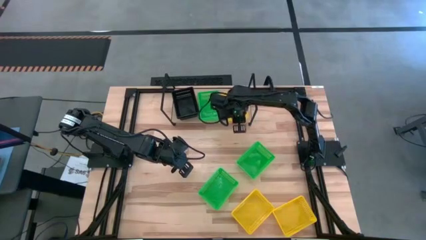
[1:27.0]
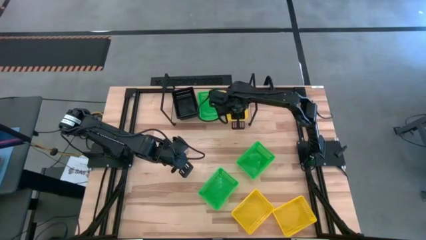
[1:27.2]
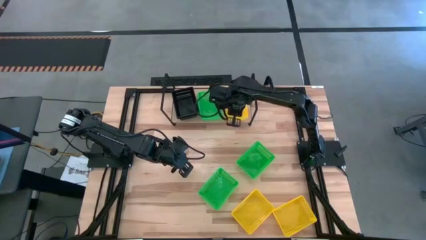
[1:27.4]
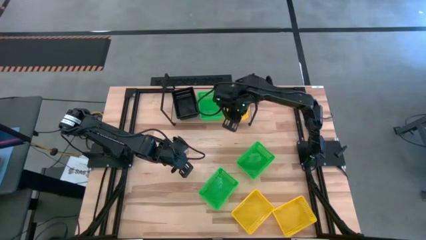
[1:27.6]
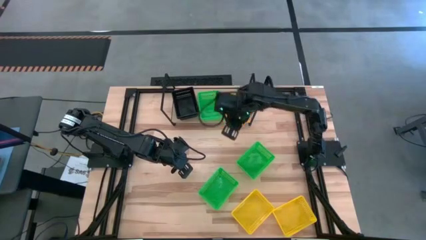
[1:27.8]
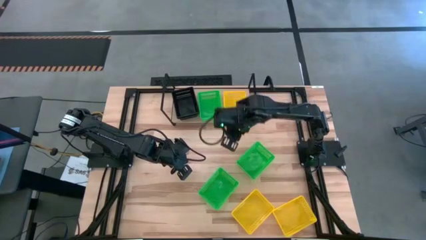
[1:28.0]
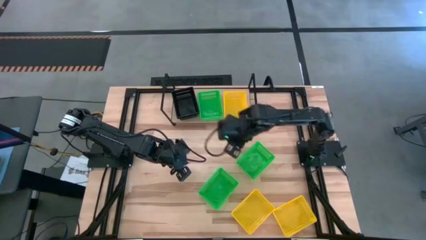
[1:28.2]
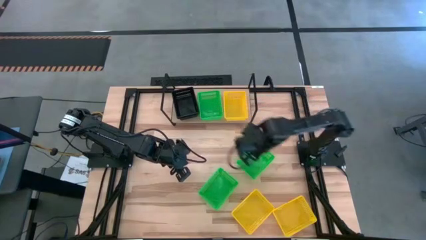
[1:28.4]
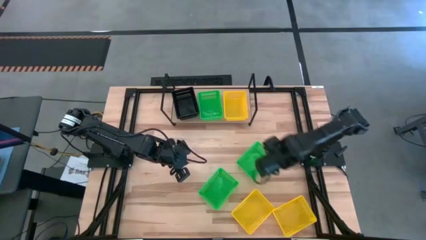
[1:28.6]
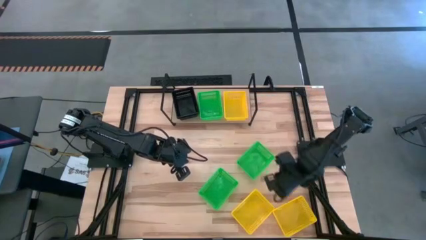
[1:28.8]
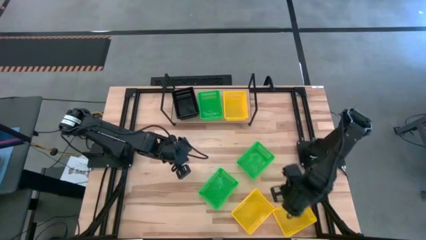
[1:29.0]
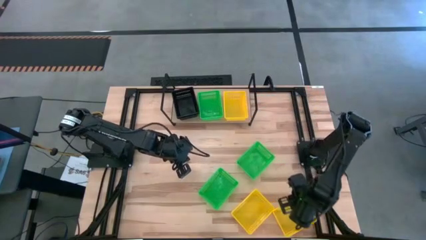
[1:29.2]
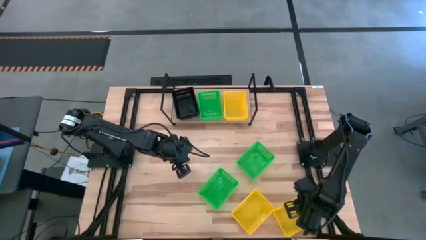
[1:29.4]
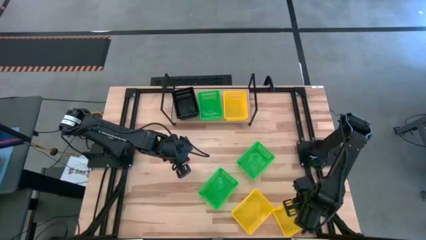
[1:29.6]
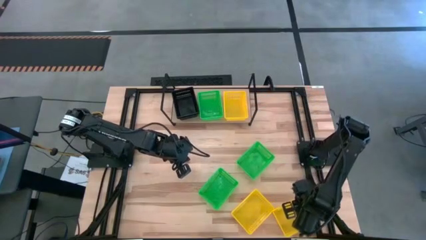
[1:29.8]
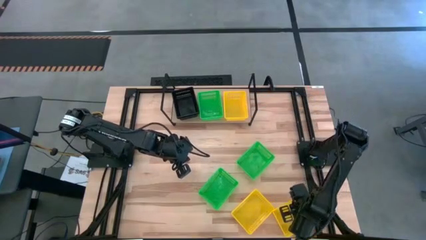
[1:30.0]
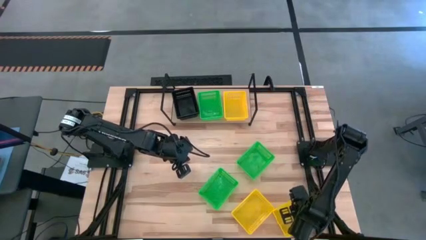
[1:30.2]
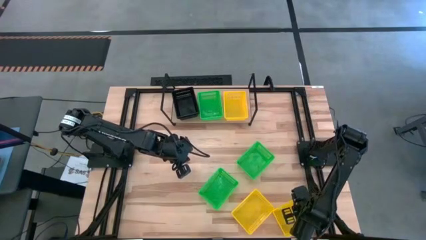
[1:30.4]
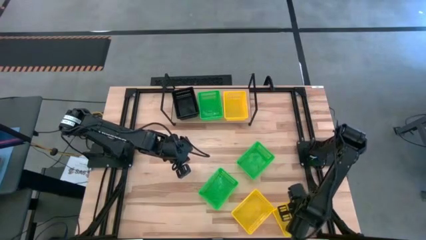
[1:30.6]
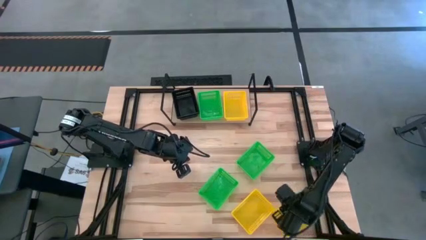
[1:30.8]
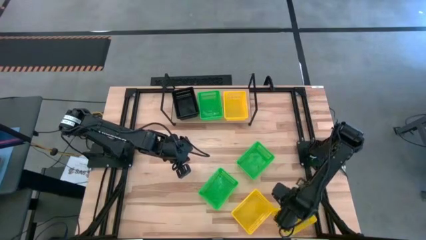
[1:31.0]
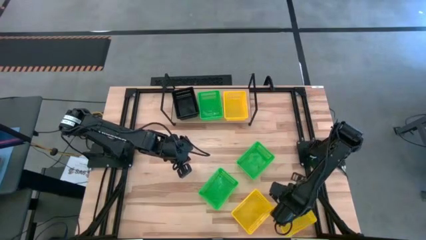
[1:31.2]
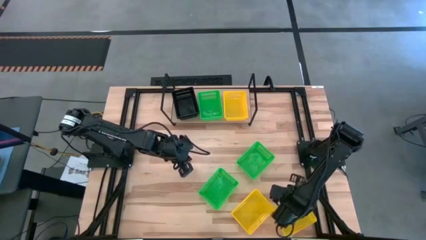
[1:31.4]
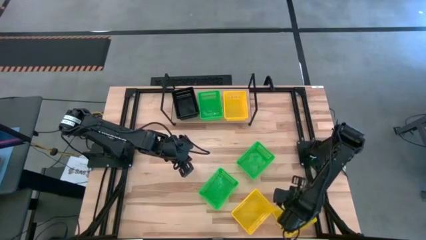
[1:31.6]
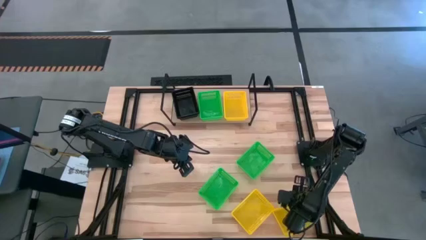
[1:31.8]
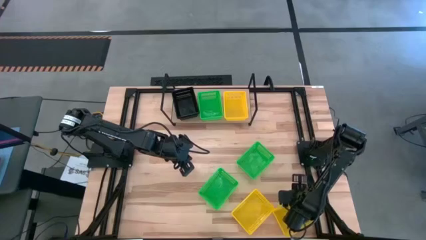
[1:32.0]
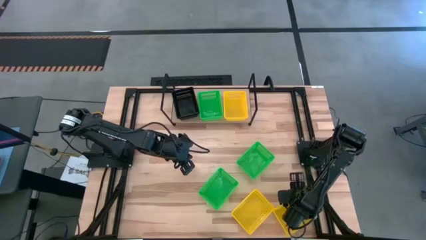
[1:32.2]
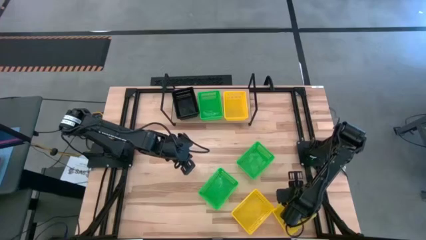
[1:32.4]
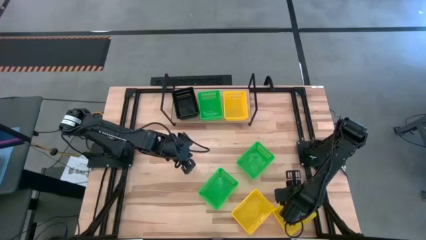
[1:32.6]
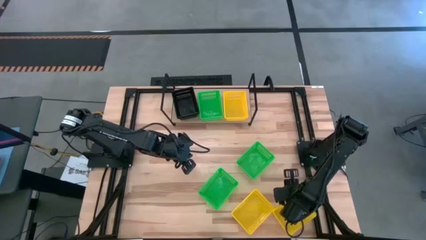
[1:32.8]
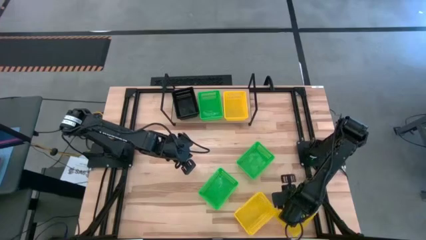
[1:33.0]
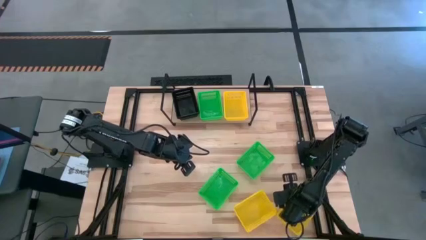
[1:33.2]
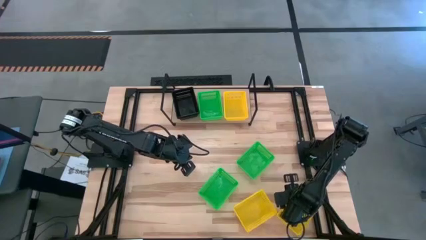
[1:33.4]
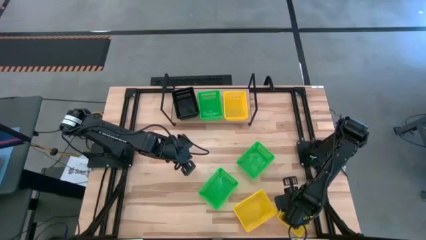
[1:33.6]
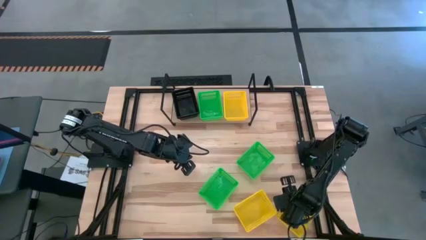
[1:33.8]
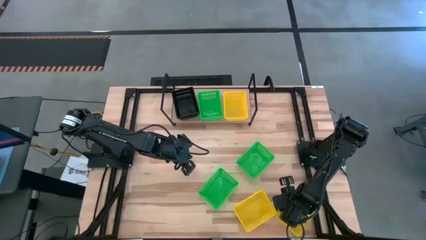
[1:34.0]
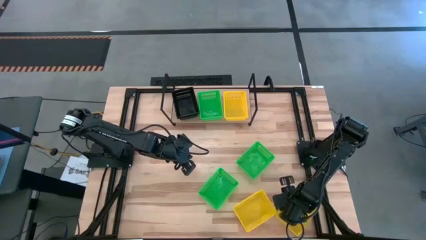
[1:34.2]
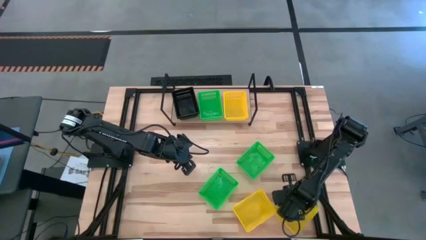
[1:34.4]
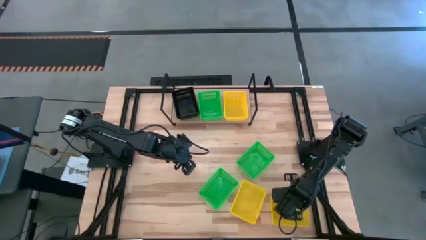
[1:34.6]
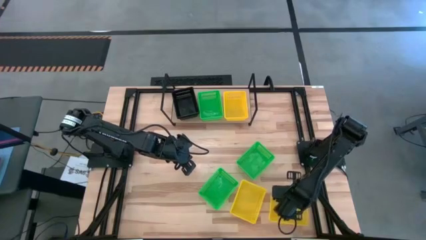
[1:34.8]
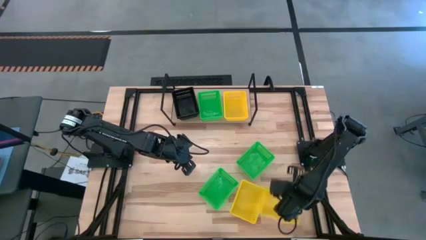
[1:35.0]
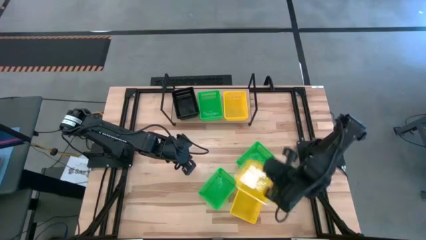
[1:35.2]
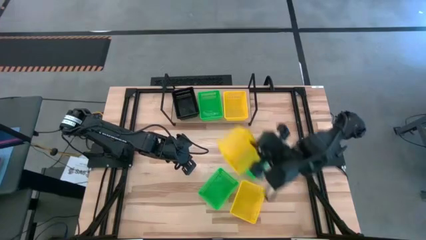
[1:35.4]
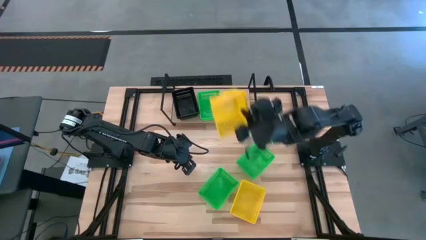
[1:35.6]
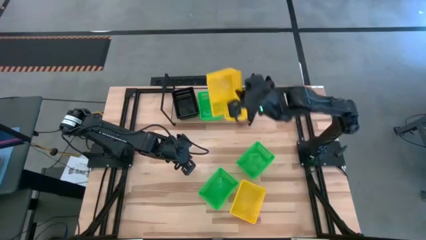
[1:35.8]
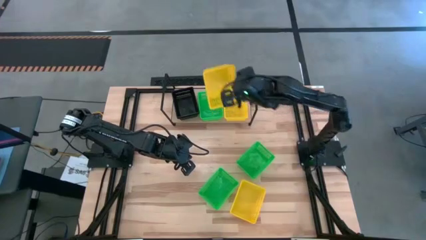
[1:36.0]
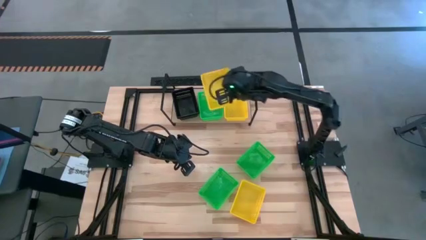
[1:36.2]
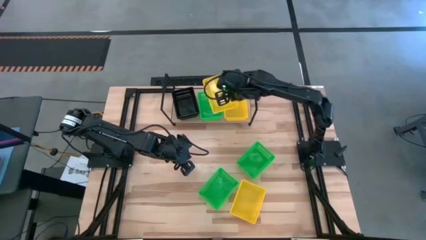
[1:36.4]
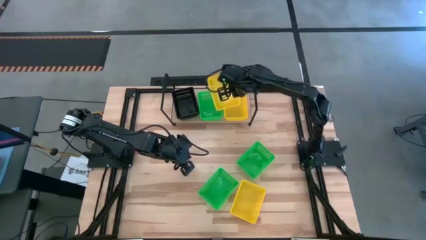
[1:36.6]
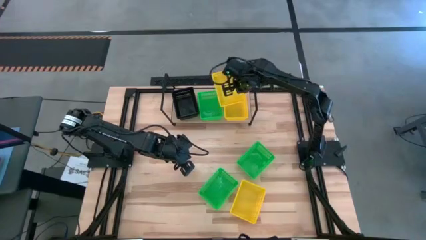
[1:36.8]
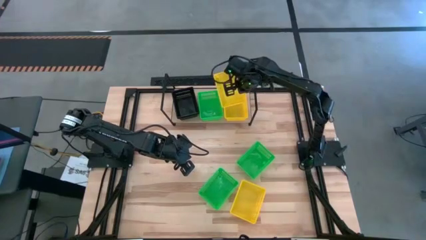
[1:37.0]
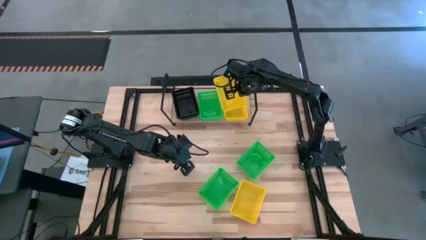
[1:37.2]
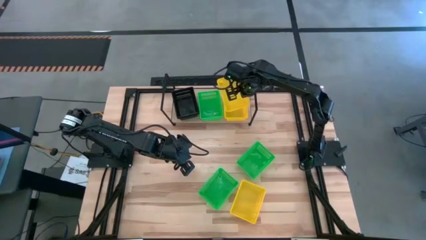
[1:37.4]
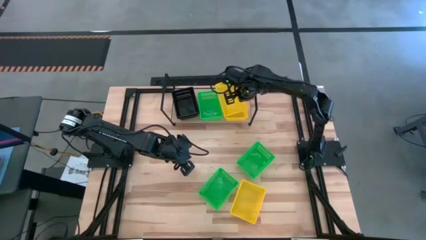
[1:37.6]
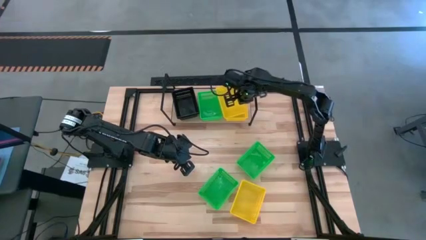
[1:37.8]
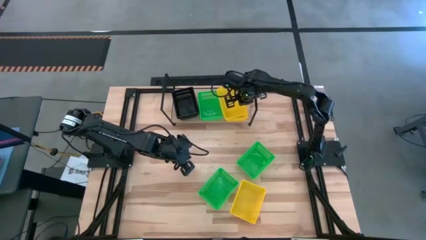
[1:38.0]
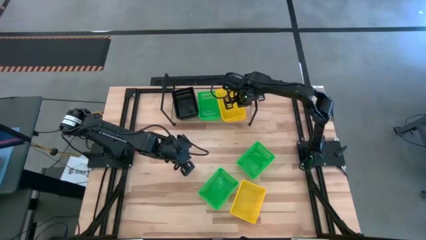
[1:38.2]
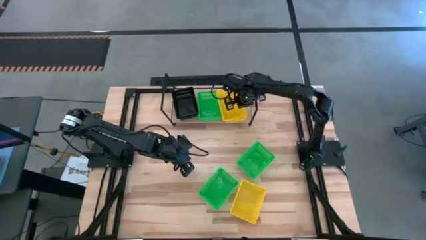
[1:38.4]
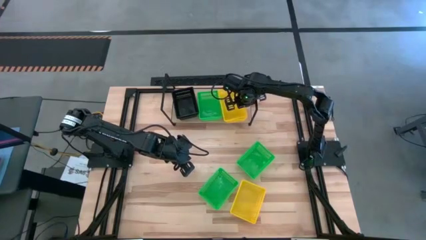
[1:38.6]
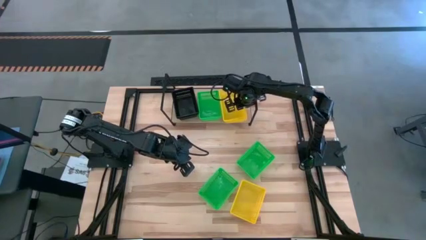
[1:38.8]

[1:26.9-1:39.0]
Task: Stack baskets on shelf by color
Stack the right yellow bin on top of the yellow bin on the shelf
